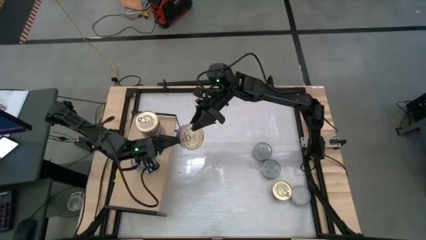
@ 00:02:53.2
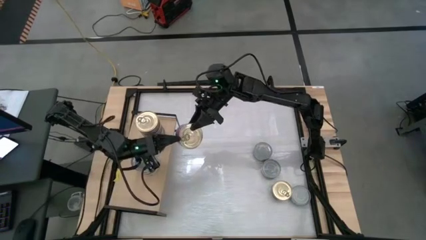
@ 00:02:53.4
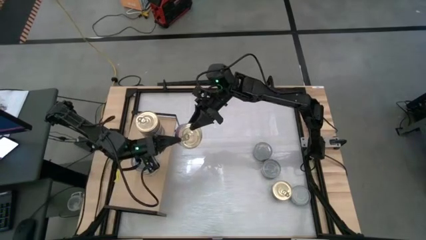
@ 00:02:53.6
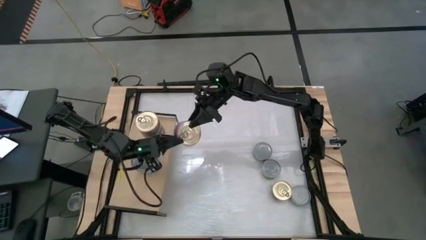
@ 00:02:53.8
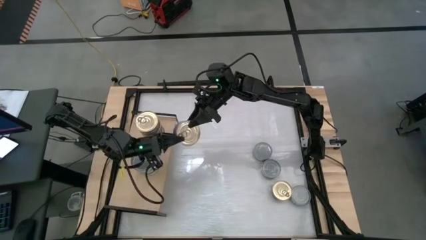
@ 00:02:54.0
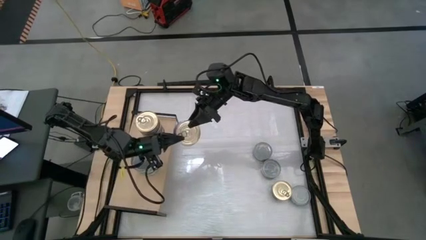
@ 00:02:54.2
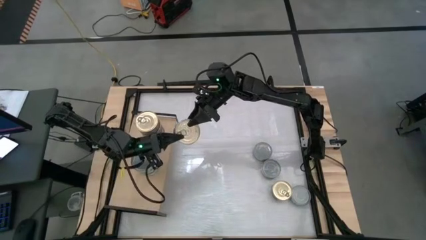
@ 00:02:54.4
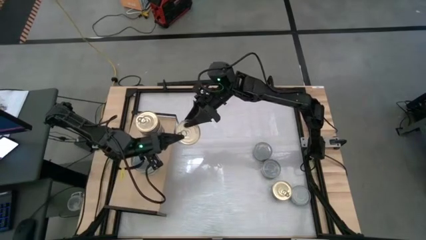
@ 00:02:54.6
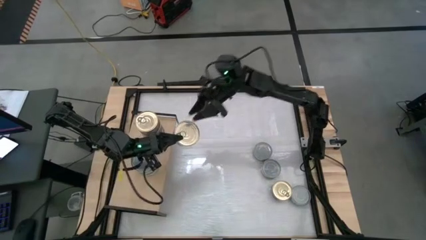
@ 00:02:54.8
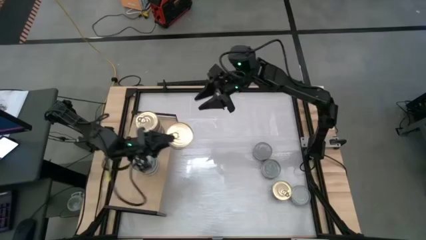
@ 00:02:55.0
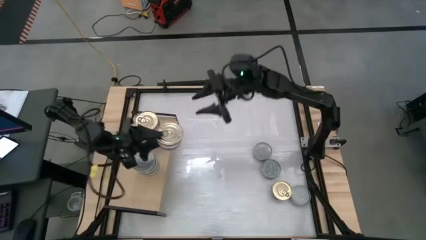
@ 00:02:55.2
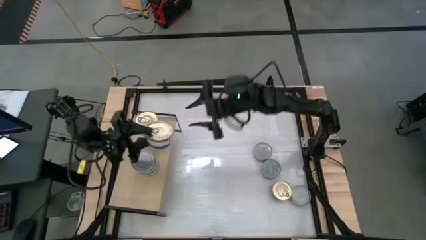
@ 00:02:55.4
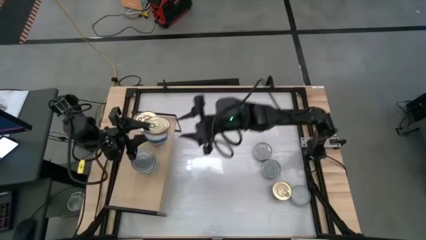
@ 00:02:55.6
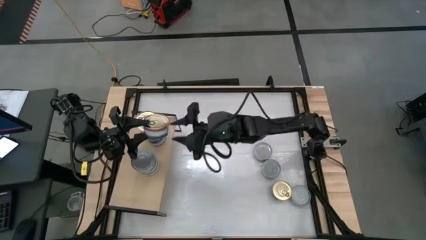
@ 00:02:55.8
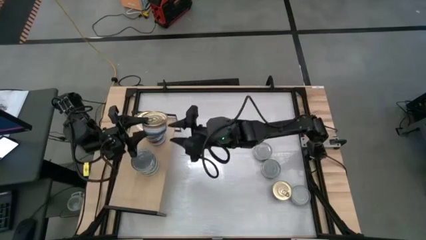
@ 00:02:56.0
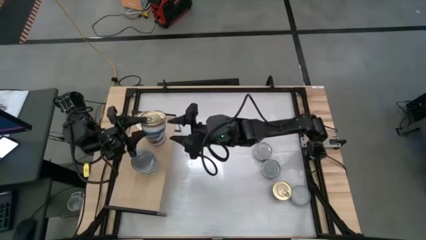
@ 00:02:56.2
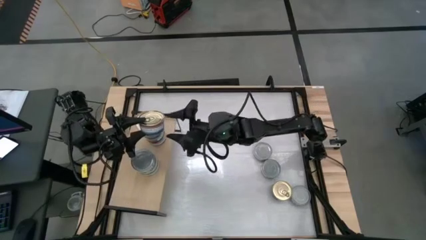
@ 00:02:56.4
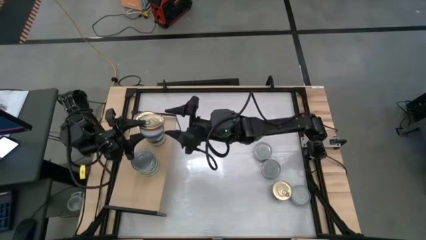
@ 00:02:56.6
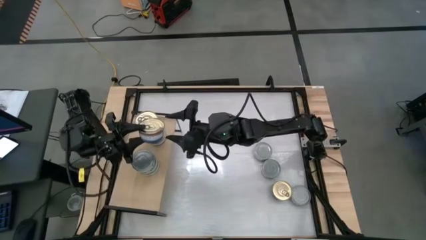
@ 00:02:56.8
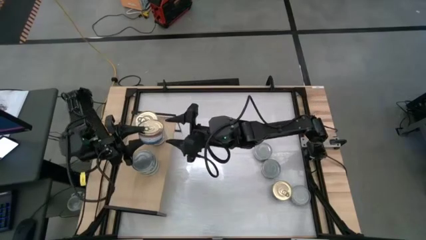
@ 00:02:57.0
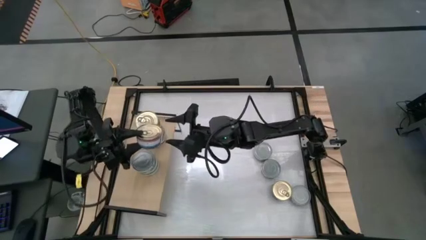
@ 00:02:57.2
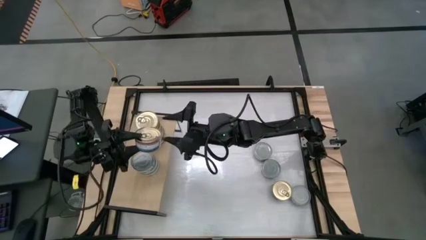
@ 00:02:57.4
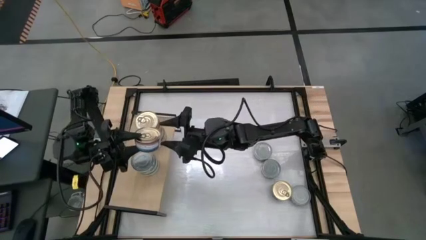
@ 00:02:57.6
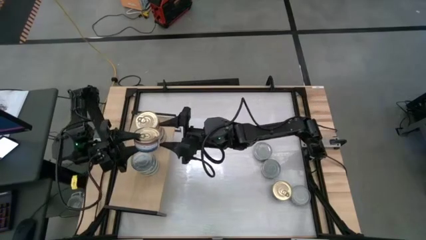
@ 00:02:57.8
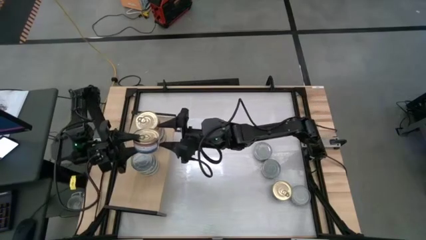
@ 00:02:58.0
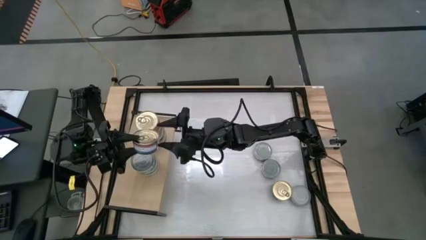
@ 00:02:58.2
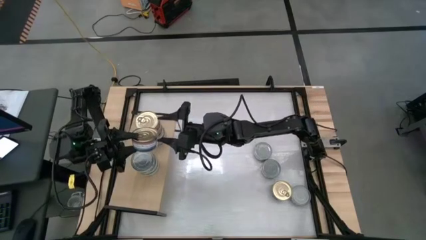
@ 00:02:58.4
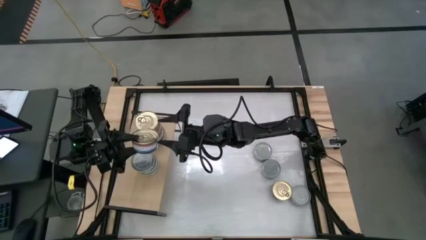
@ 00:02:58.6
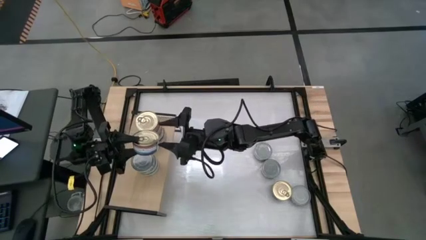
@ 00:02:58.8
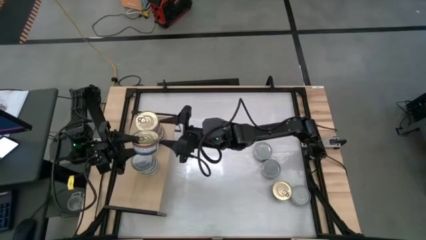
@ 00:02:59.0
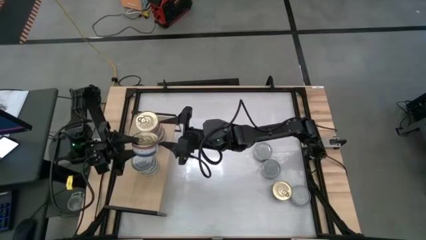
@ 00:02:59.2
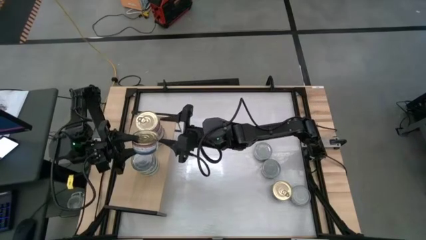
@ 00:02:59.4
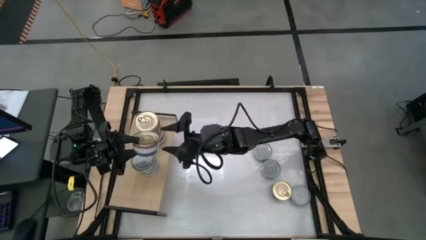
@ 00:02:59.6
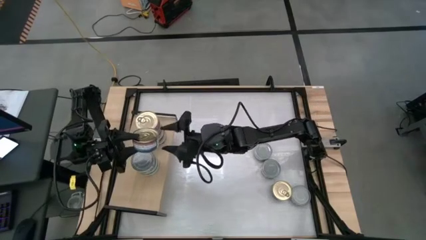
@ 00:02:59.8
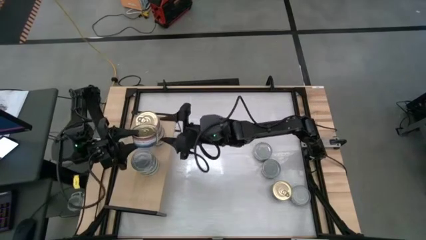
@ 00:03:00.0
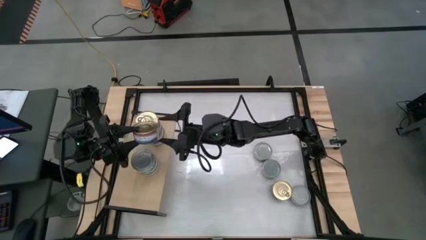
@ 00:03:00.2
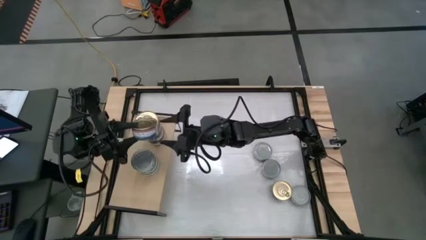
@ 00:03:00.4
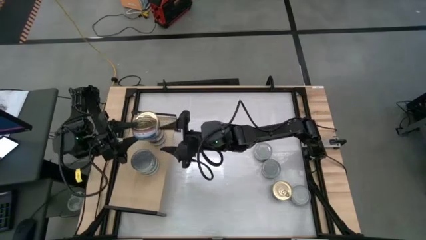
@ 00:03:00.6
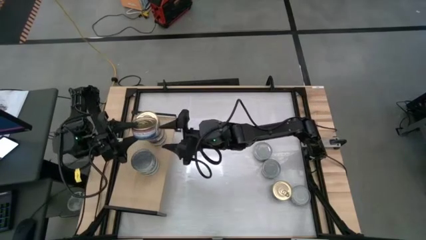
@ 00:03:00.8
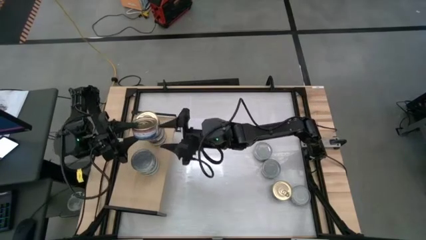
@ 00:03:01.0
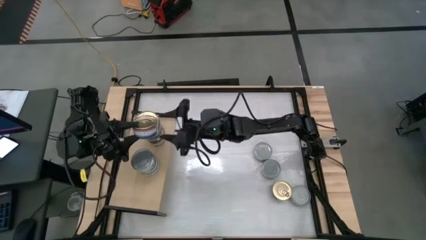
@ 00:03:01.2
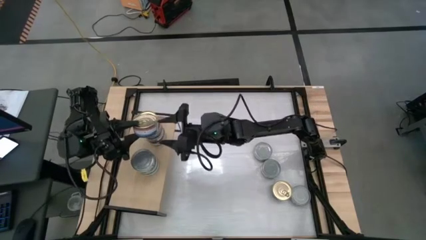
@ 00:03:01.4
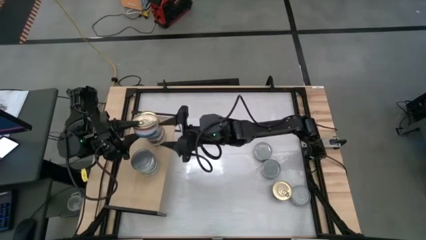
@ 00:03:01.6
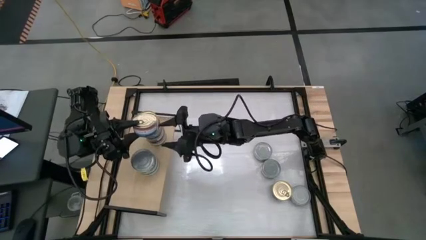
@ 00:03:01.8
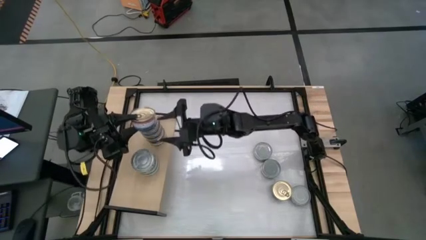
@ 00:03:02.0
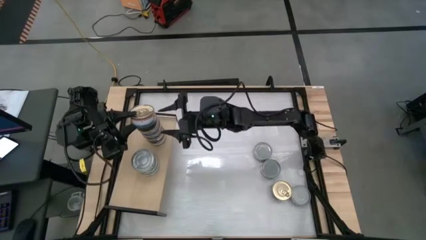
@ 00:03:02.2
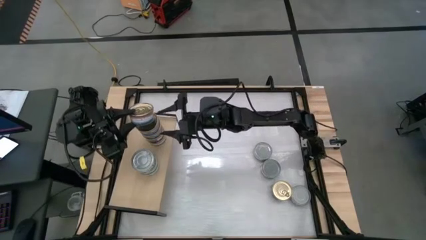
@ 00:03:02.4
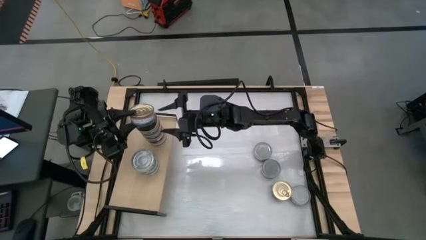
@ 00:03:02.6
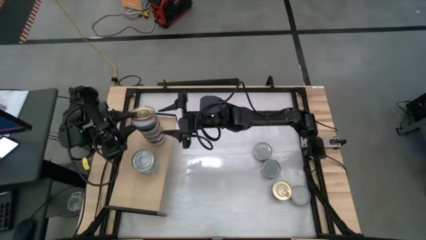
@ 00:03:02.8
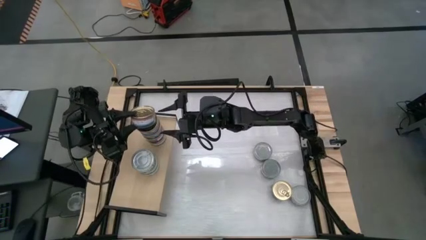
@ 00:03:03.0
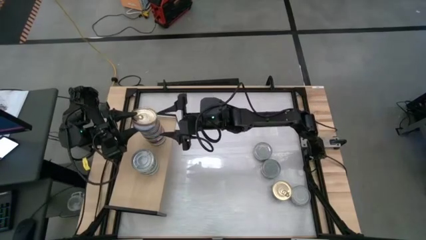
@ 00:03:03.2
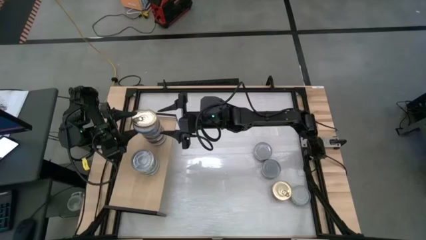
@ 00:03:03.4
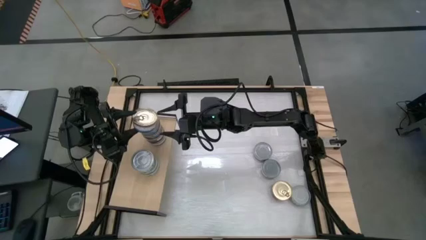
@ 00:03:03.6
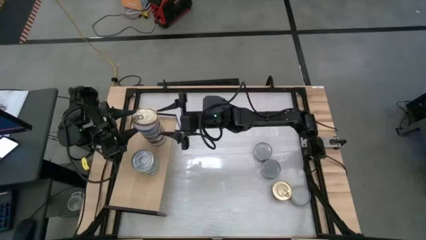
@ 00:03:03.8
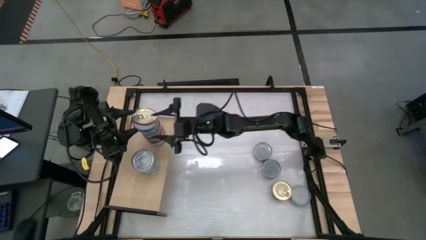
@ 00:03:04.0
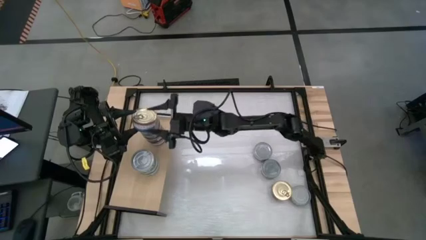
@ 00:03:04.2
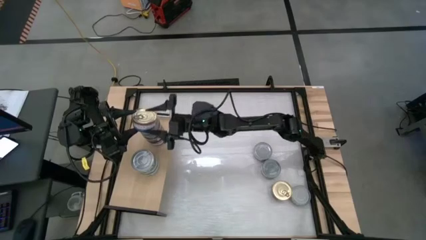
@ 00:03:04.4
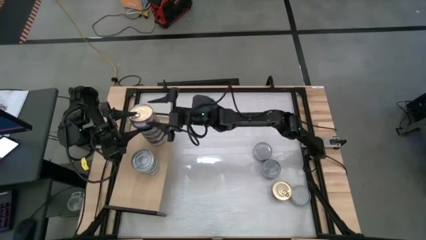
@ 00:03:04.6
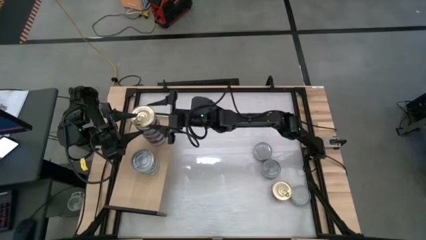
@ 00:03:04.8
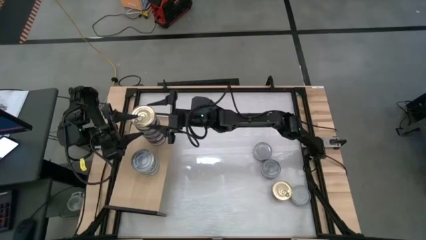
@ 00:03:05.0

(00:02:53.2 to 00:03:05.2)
Task: Stack canned seafood by type on shelf
Stack the green tuna can on top of the green tuna can on the shelf

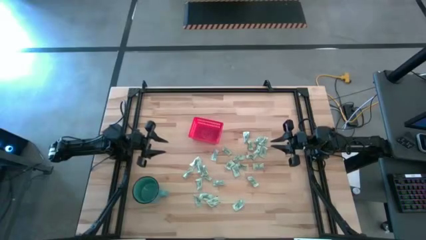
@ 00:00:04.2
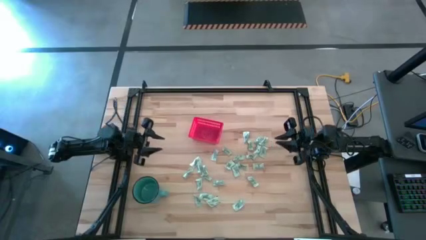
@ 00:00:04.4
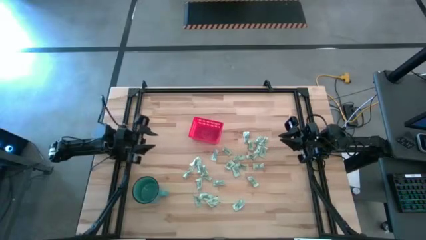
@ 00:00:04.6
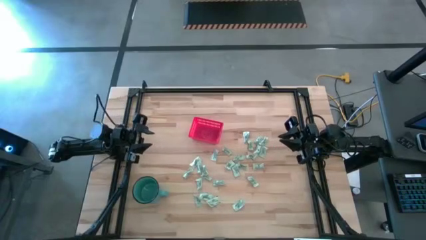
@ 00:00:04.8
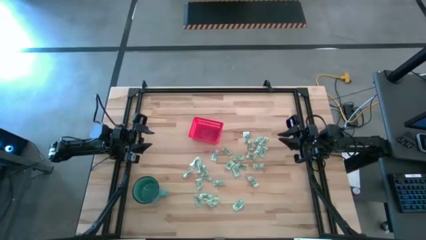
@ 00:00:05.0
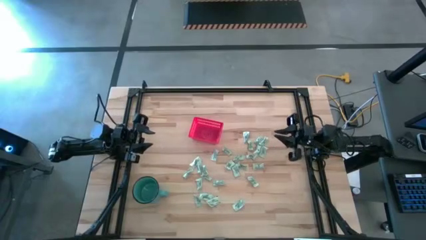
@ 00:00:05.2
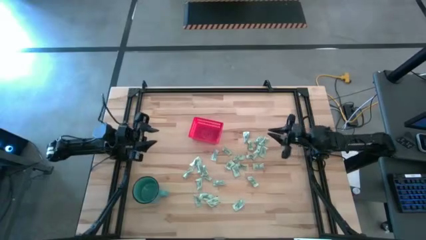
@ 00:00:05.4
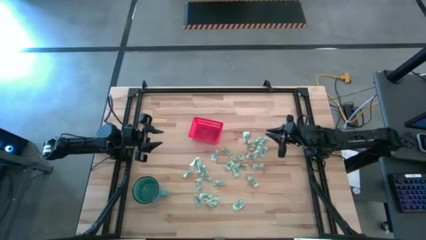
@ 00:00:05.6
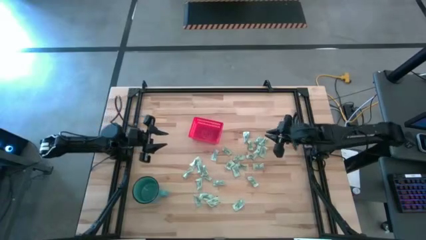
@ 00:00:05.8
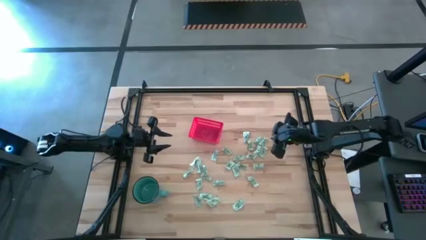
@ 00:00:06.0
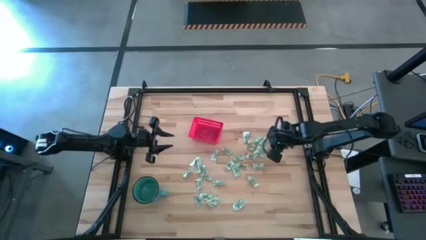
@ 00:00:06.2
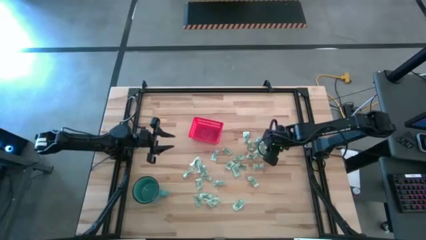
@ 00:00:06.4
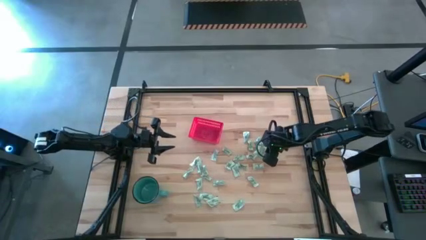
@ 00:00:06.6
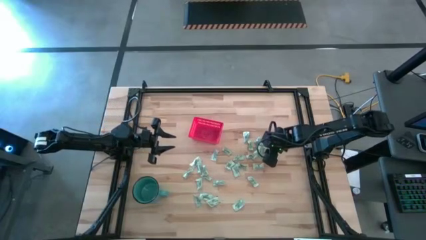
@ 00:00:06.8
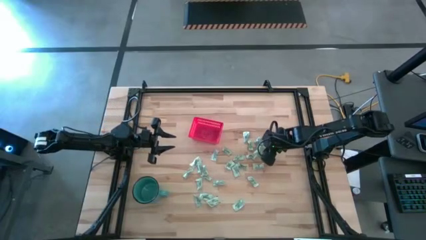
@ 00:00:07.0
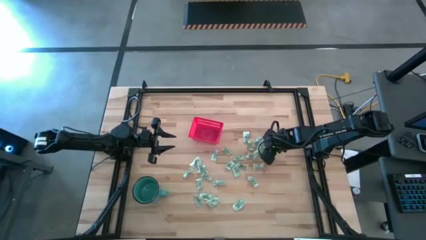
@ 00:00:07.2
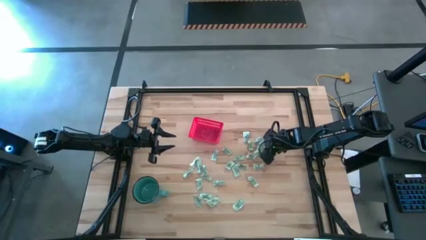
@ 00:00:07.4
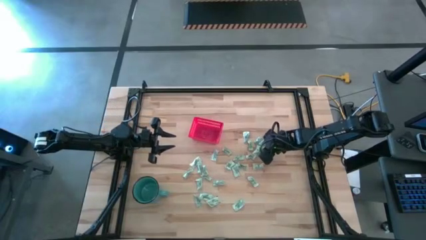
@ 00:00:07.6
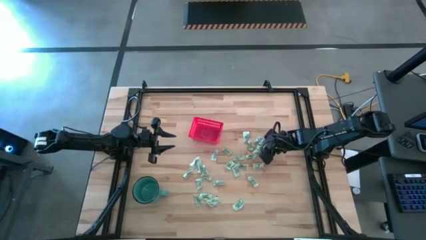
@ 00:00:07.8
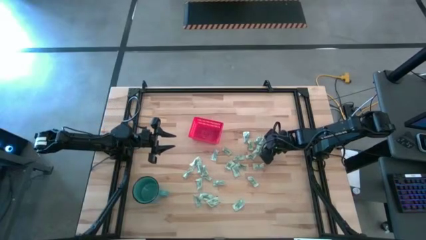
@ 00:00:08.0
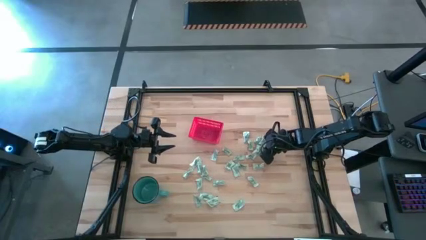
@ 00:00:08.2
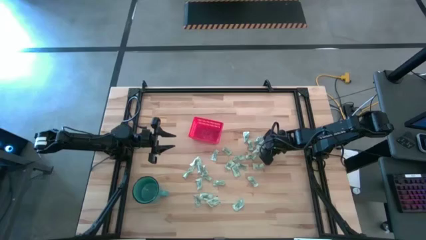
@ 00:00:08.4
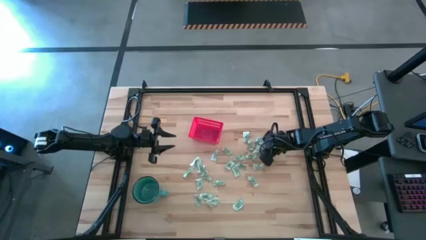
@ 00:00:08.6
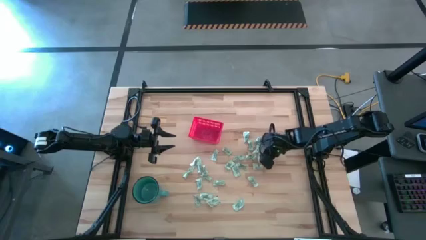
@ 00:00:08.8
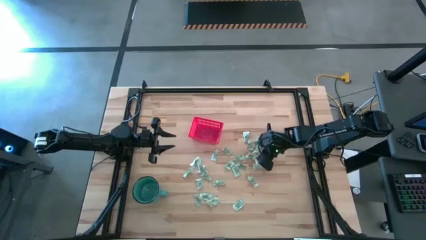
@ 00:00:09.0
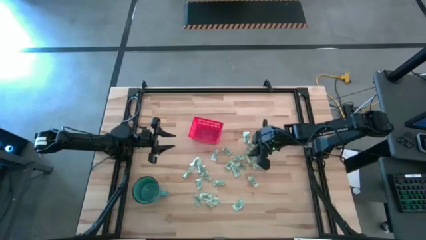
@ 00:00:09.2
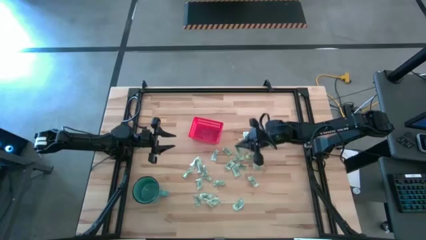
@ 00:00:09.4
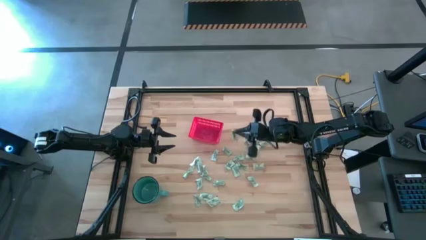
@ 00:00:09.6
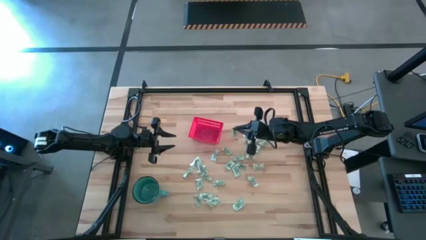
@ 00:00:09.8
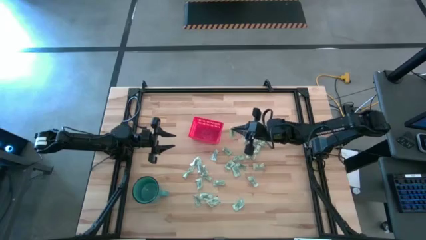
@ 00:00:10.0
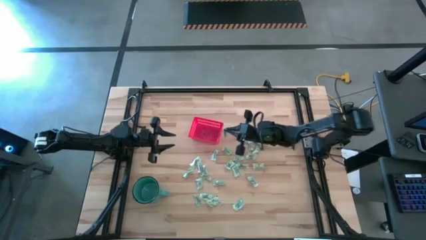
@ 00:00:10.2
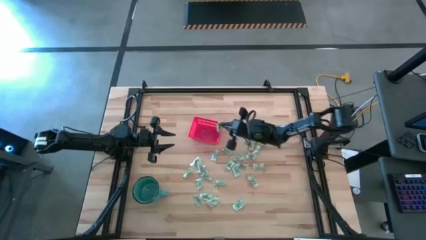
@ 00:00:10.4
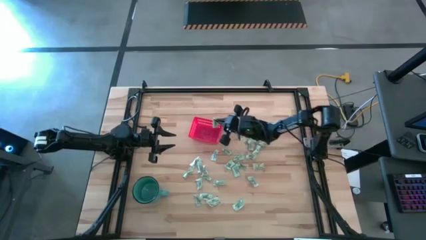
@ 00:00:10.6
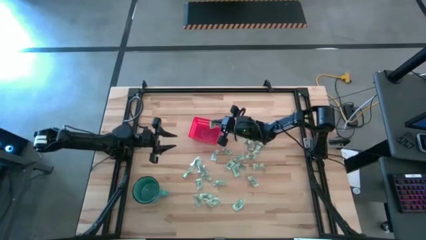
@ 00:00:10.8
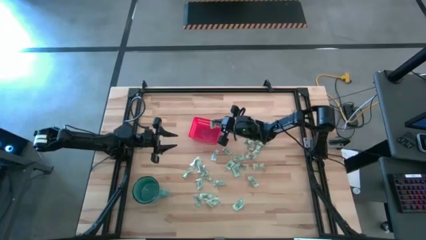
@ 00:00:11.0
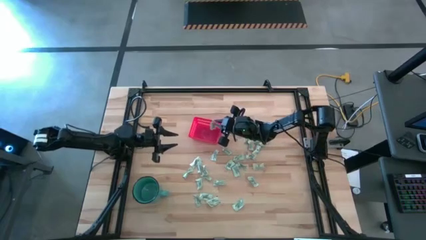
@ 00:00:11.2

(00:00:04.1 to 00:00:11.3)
Task: Pick and place items into bin
Put the stevia packet into the red bin
